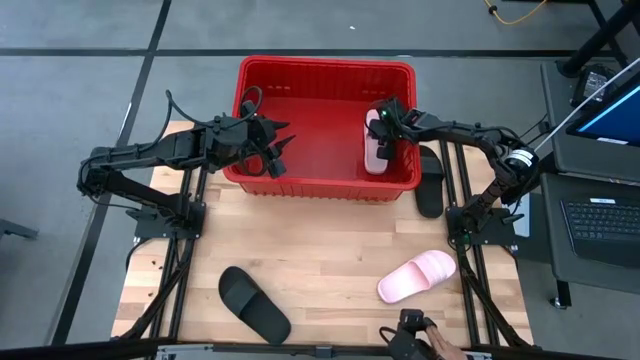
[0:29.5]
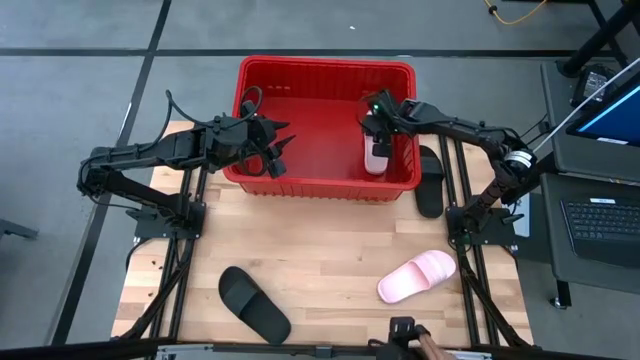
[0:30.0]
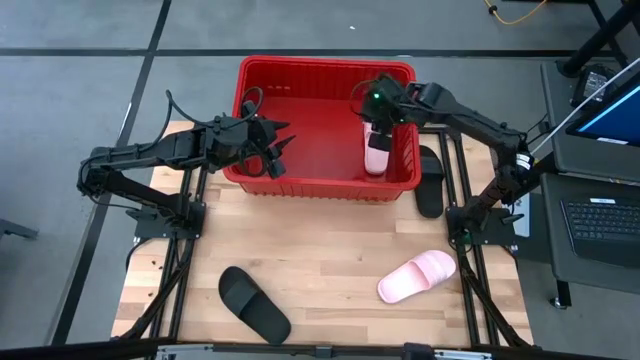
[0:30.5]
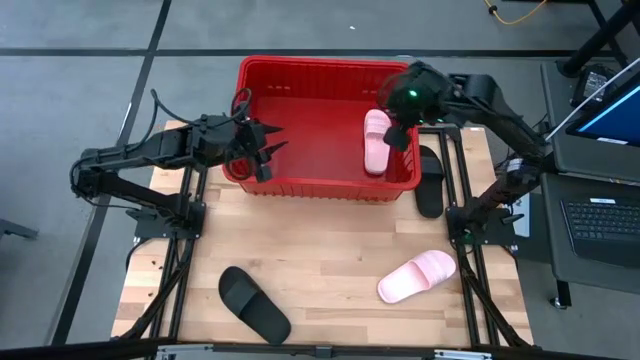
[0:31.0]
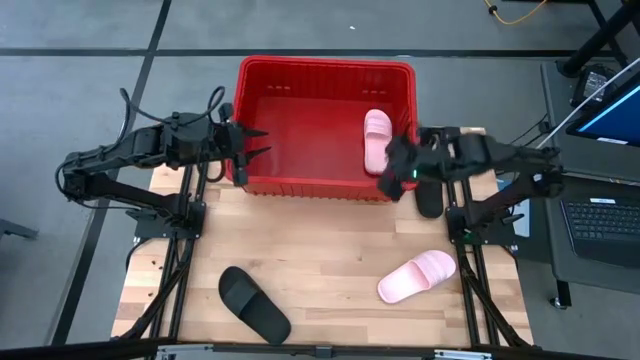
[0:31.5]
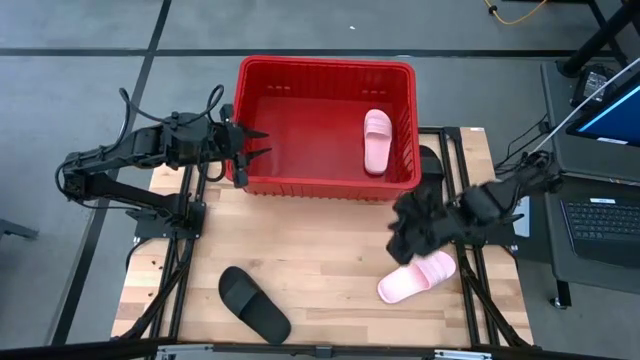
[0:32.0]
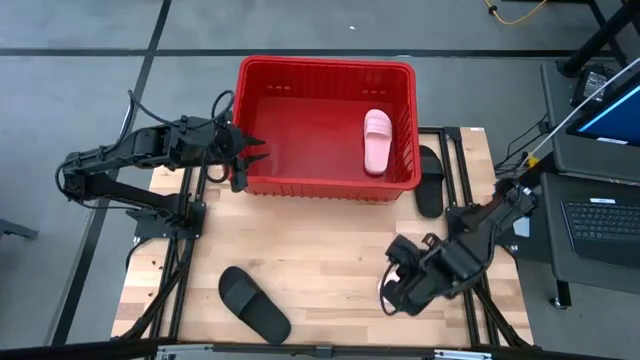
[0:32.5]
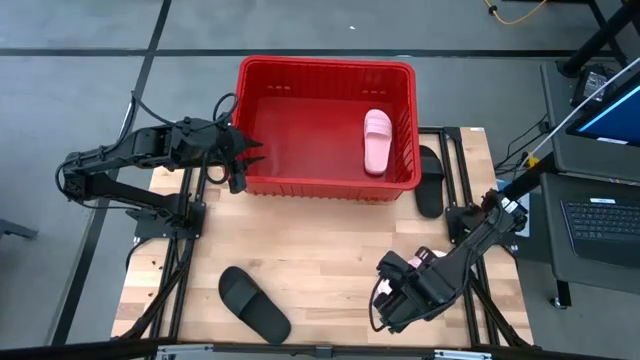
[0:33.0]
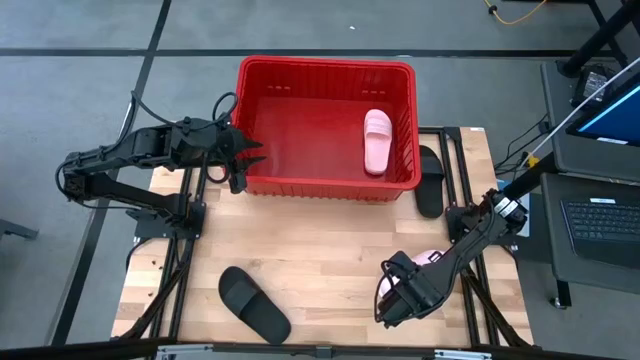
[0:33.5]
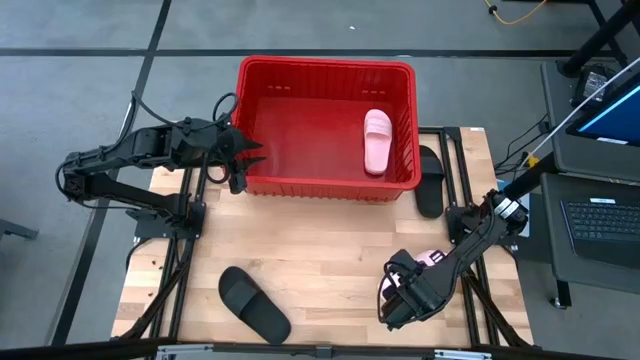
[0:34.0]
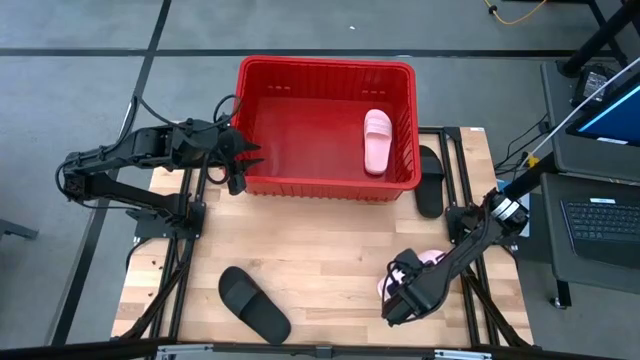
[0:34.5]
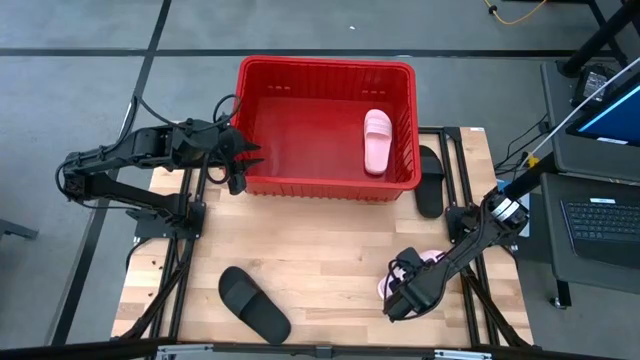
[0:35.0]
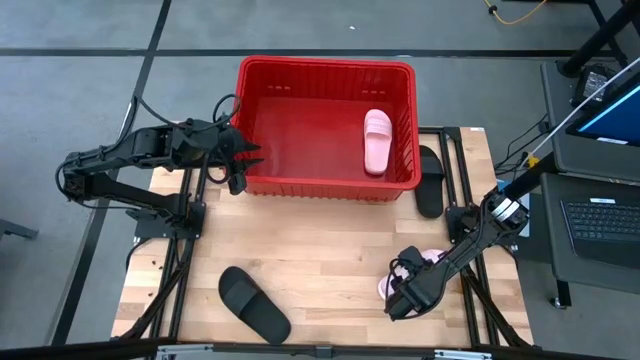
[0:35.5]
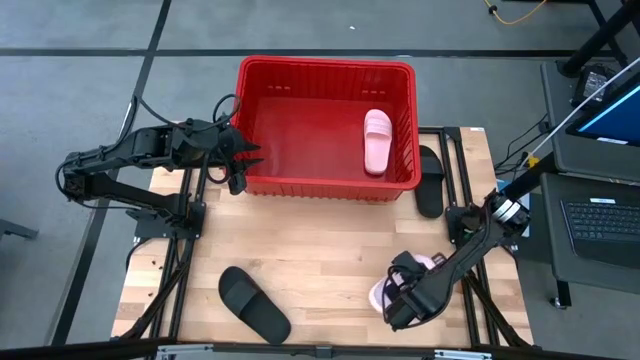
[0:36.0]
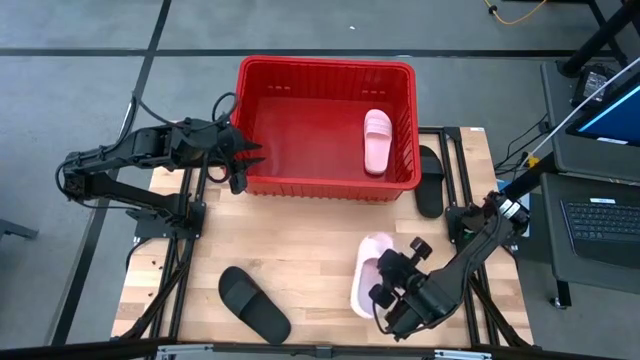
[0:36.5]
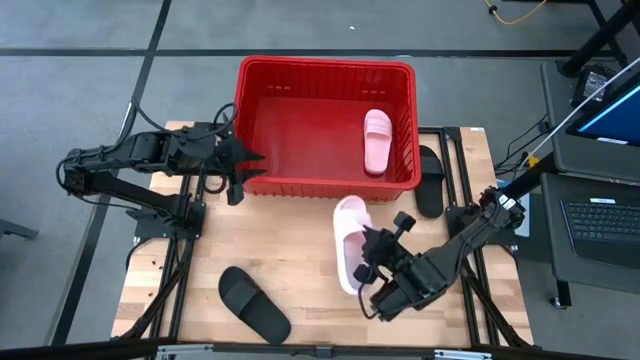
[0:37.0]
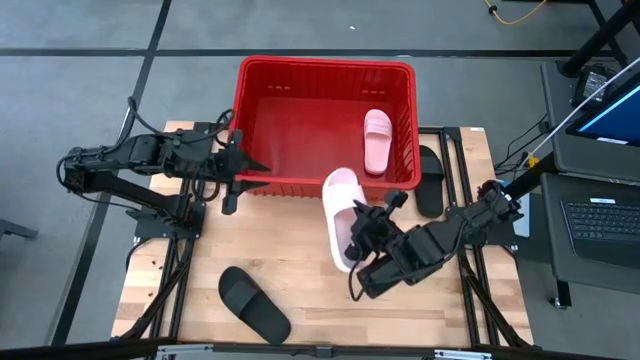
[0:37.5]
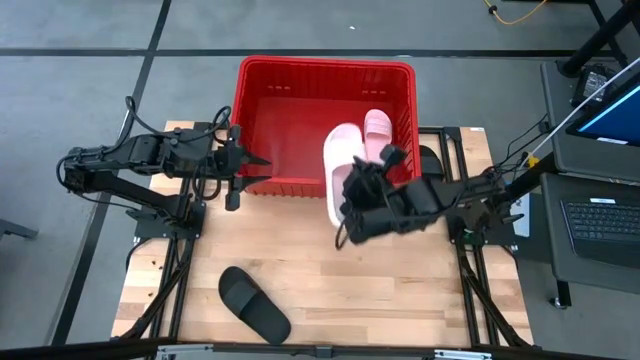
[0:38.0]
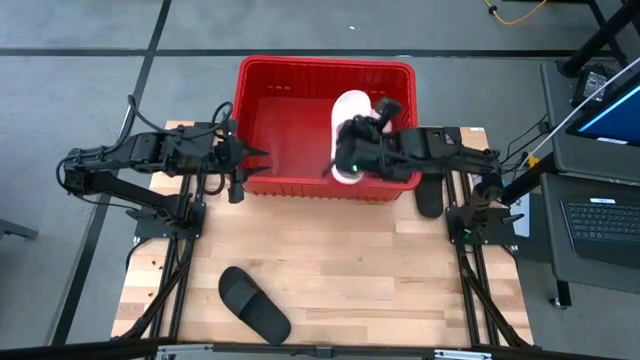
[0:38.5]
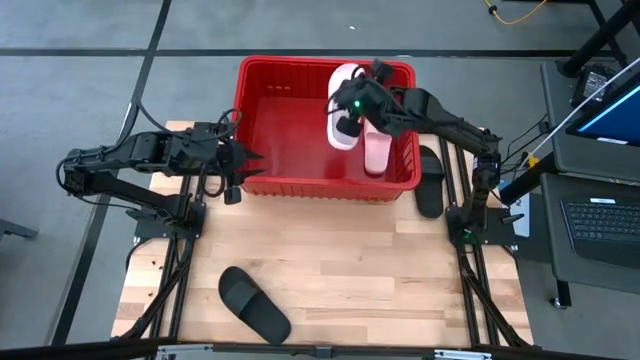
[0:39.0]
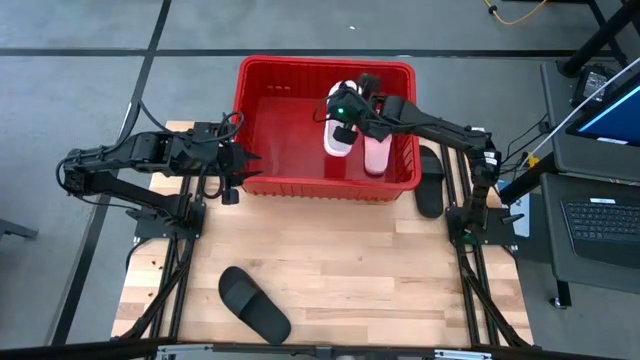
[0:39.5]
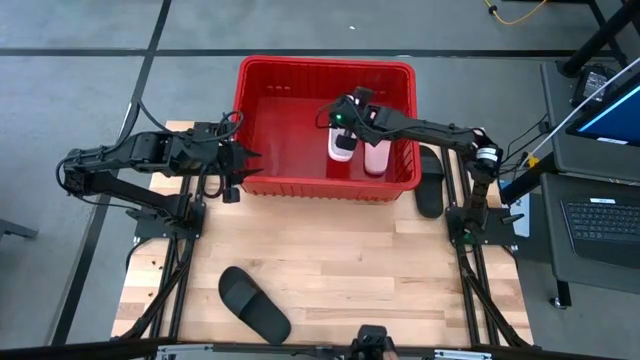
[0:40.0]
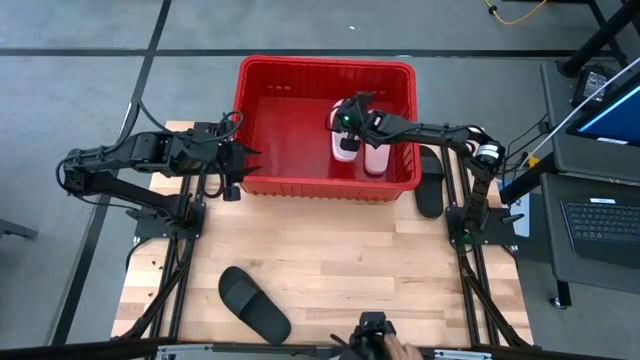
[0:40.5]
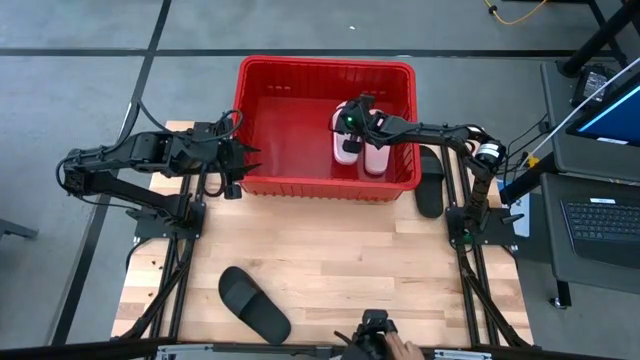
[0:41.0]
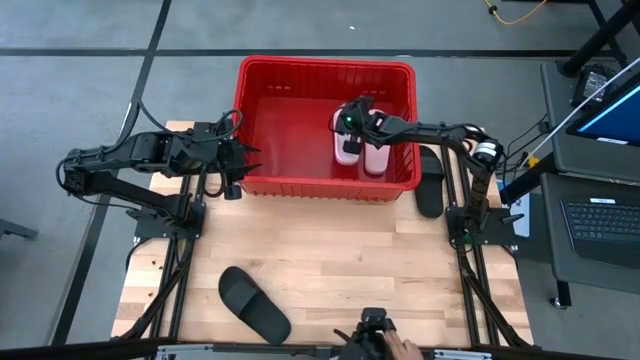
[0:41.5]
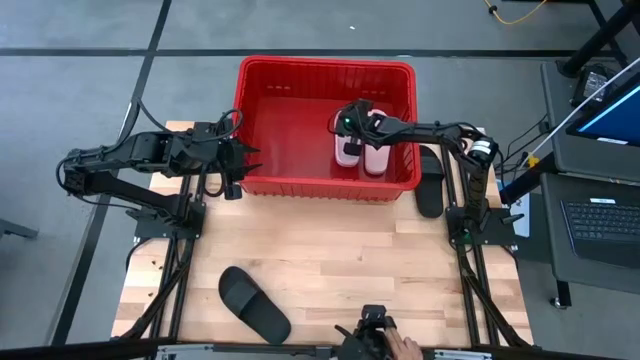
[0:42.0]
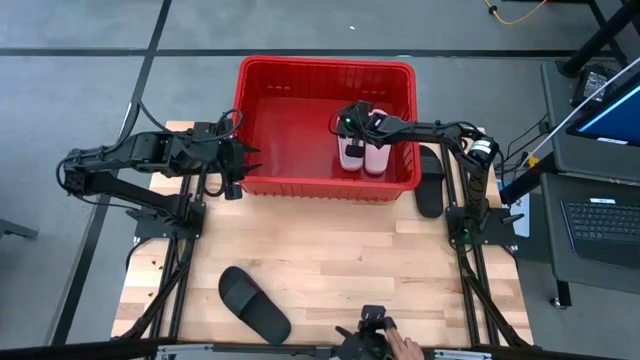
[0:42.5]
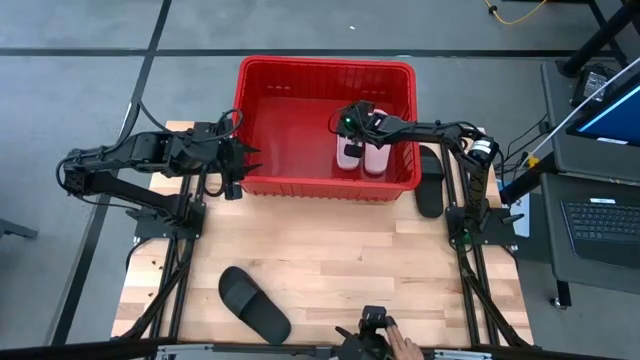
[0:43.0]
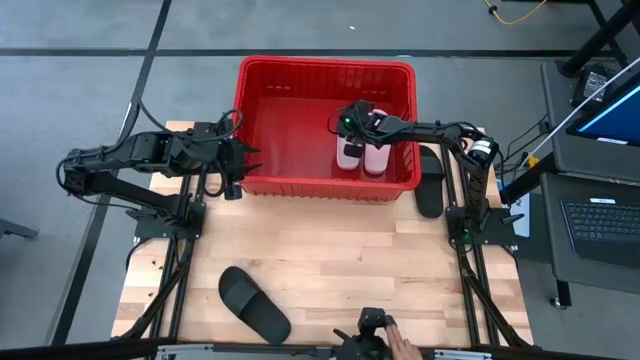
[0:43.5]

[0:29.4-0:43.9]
Task: Pick and place slides into bin
Put the pink slide into the bin

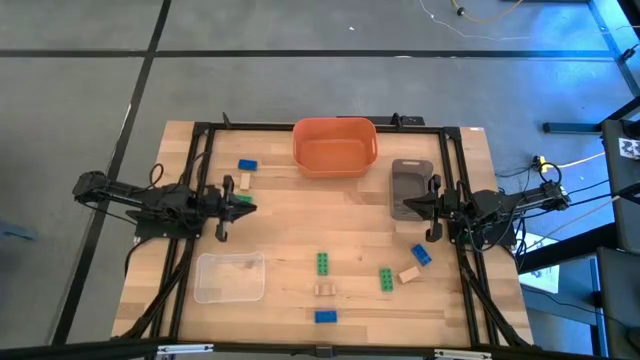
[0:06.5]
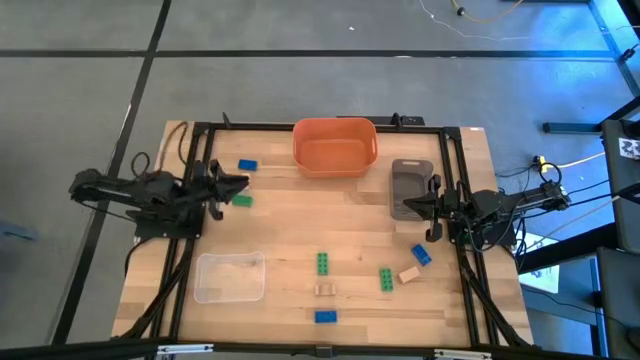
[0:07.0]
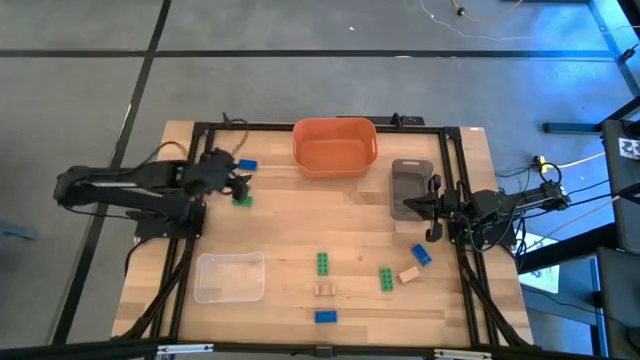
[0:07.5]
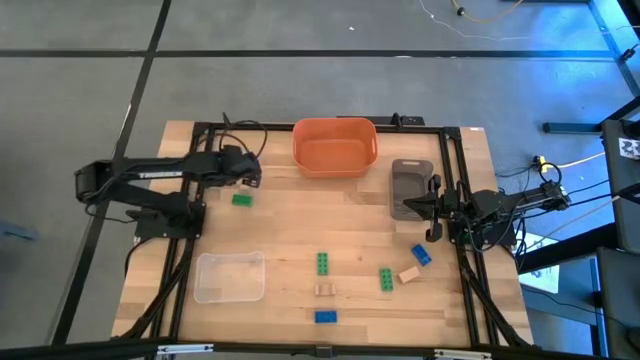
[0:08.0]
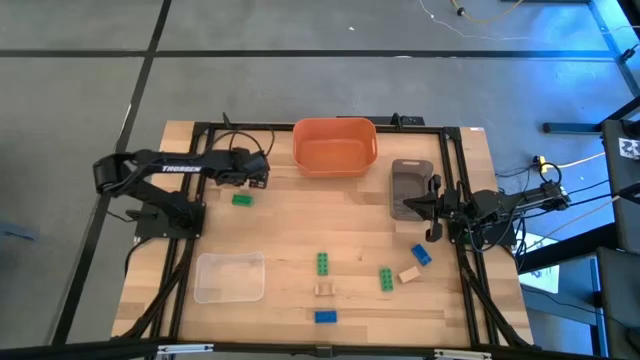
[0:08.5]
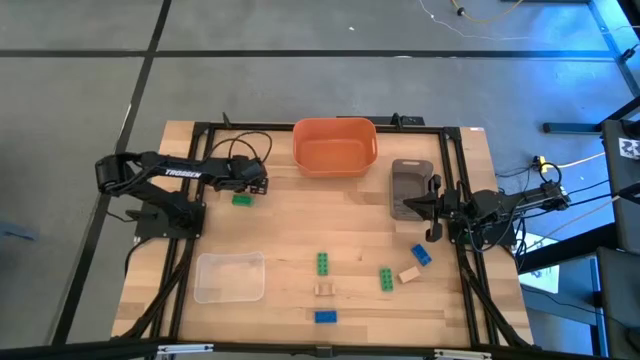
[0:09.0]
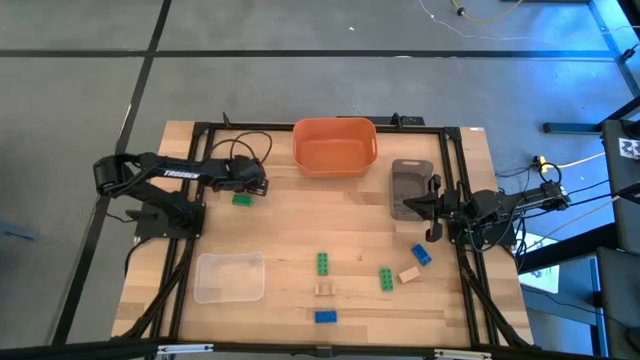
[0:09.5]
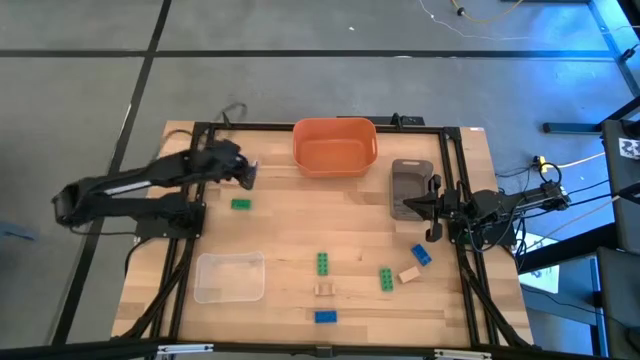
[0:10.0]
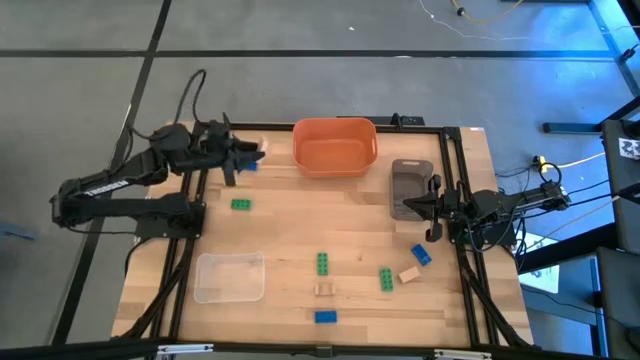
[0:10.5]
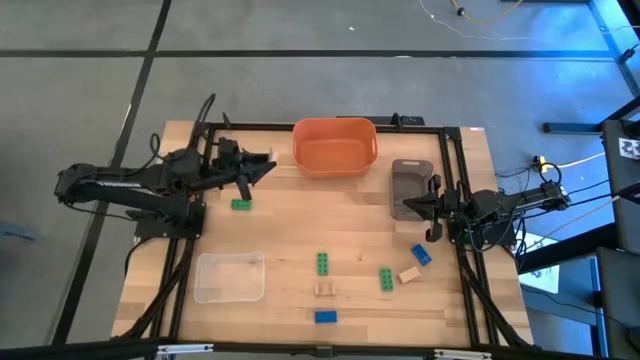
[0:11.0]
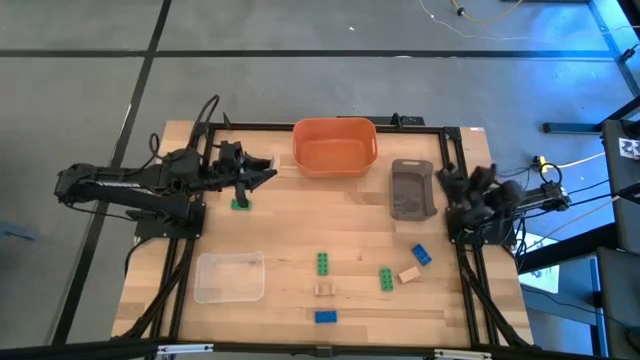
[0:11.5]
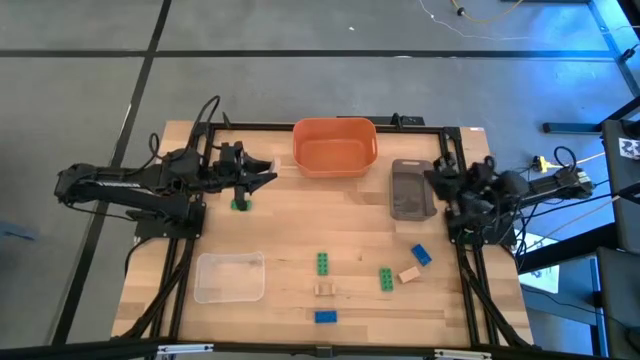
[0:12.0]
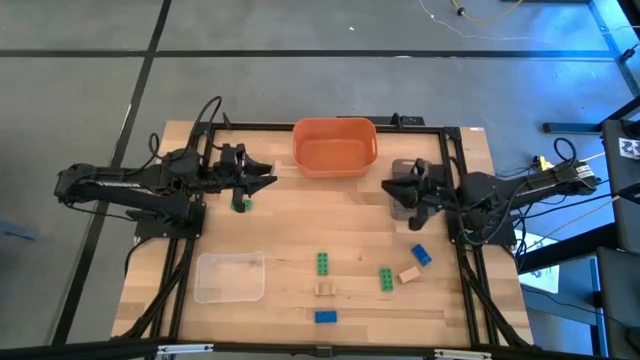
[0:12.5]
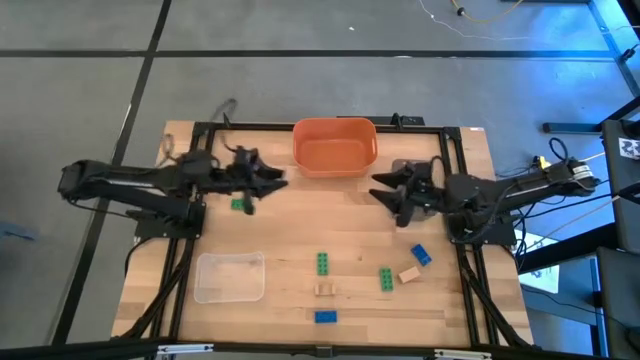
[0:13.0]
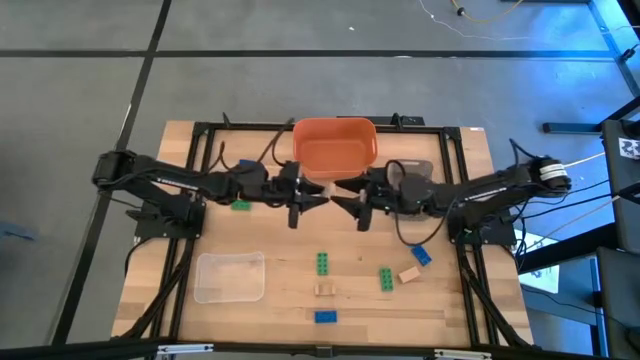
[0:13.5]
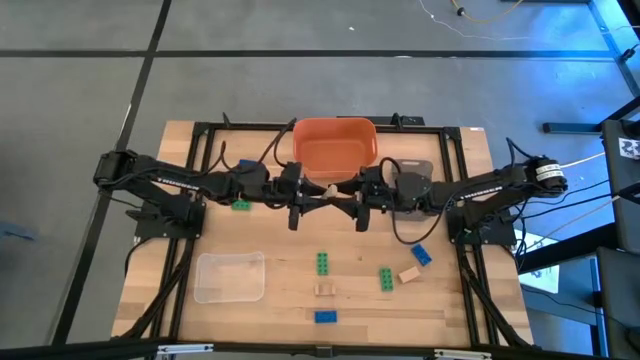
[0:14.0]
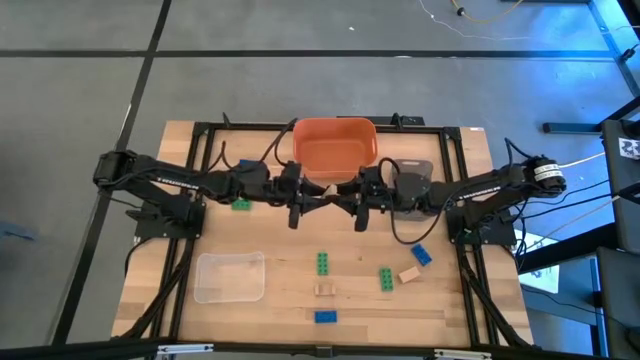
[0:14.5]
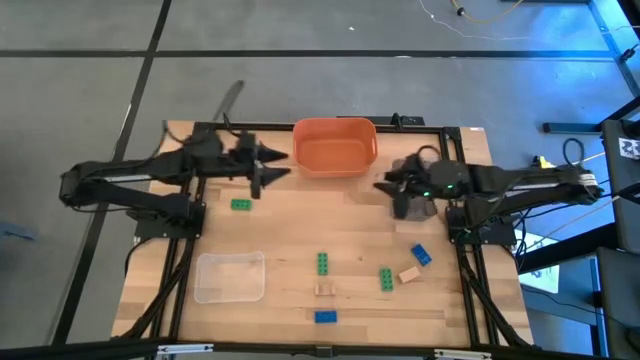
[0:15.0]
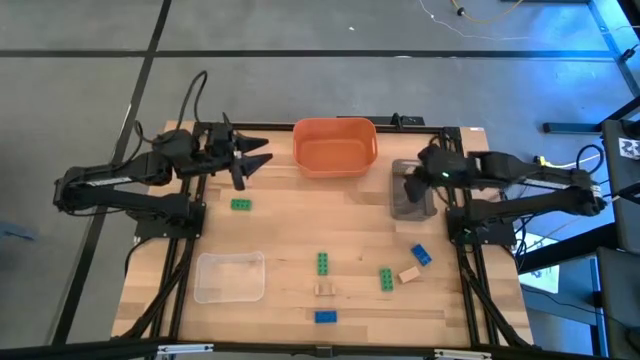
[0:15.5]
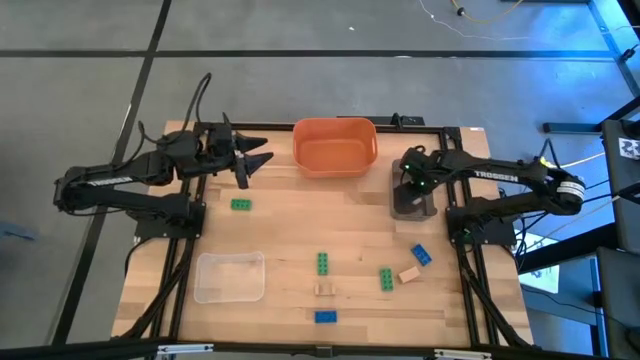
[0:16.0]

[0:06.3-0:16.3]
Task: Sort & place blocks by color
Put the top left brown block into the black bin
